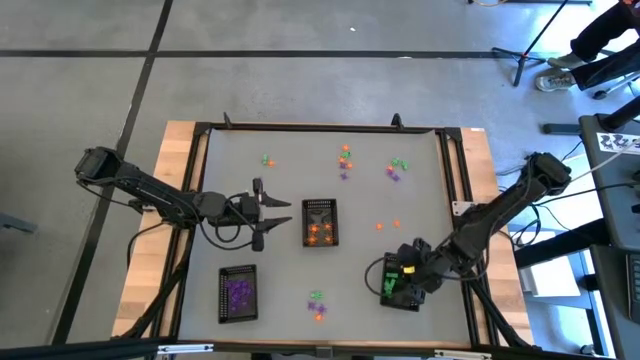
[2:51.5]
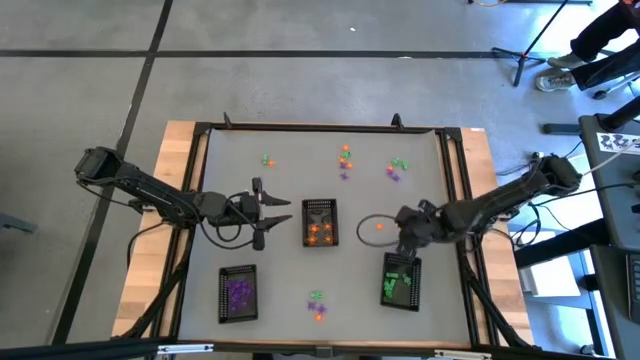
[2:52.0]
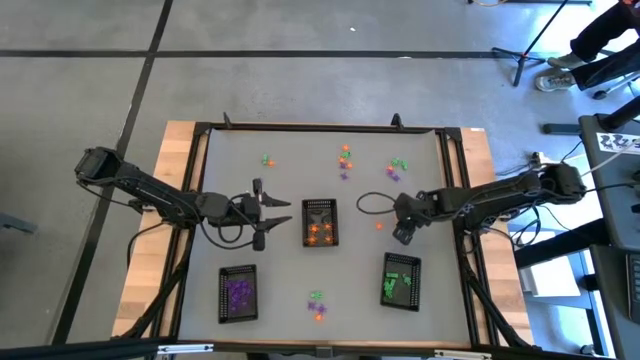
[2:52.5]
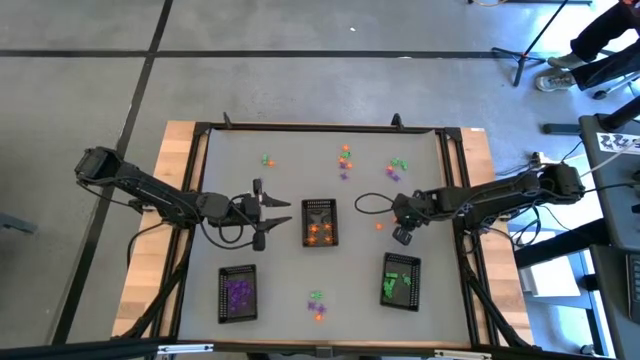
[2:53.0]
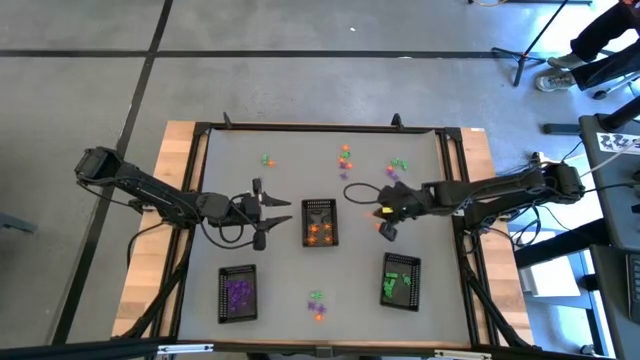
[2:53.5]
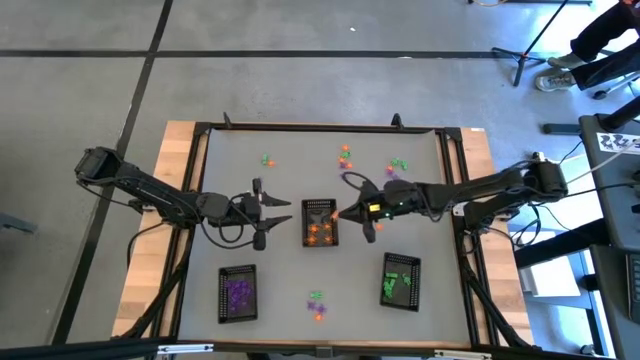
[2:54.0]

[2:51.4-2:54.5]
Task: Sort Halloween decoration
Put the orange spider toy into the top black bin

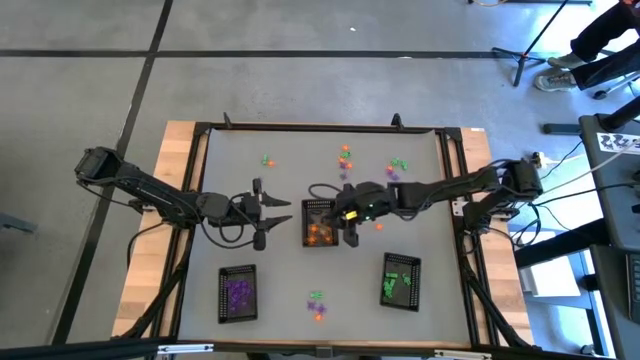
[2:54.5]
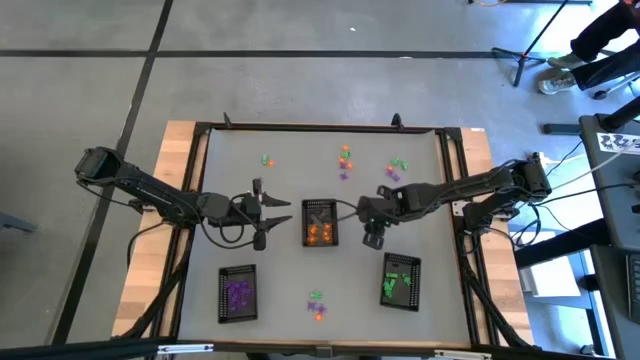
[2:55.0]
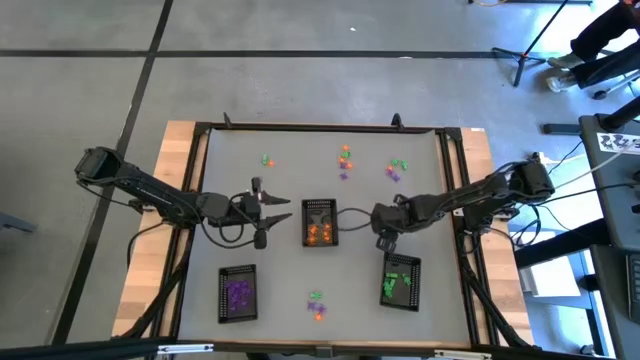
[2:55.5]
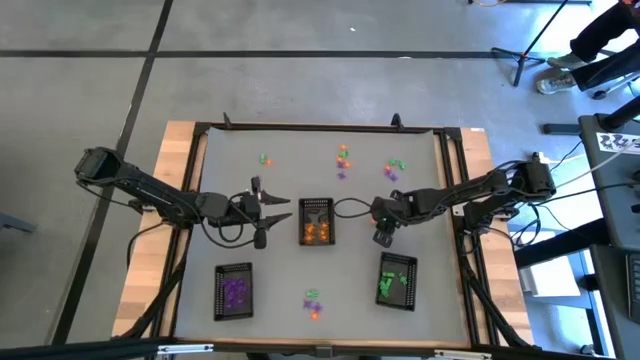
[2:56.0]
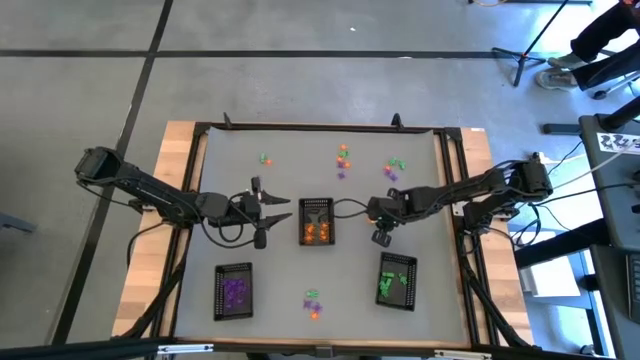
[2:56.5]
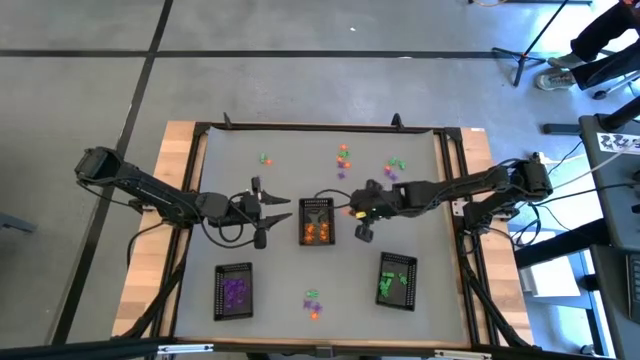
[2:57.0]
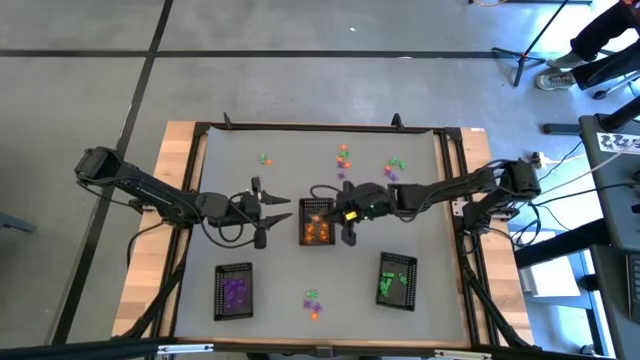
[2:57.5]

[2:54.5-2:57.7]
Put the orange spider toy into the top black bin

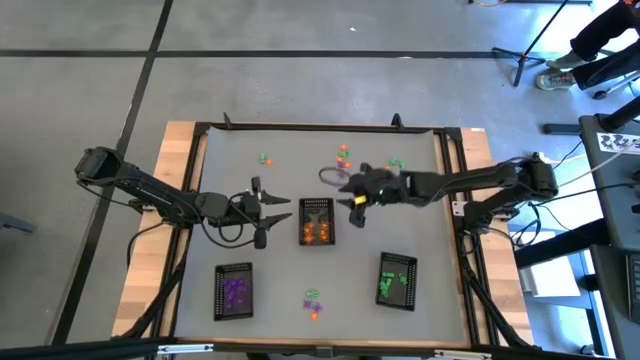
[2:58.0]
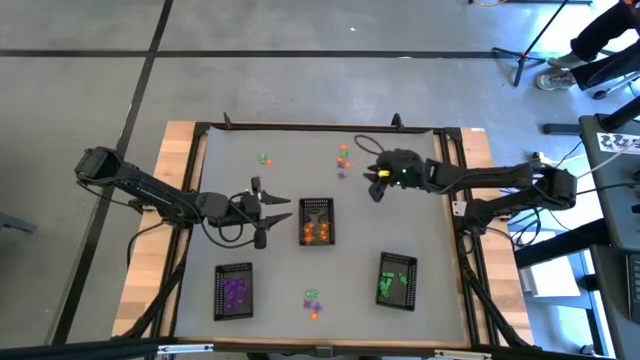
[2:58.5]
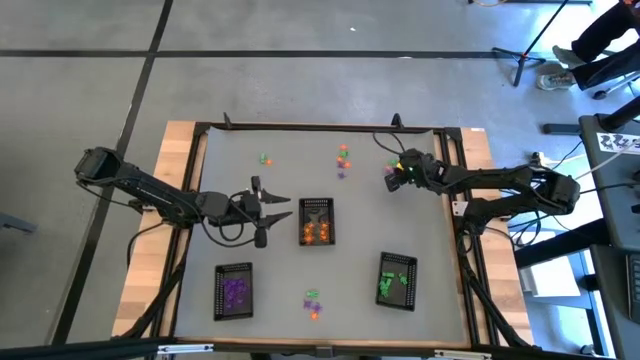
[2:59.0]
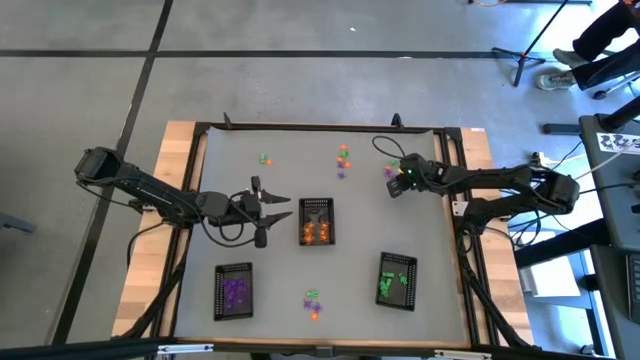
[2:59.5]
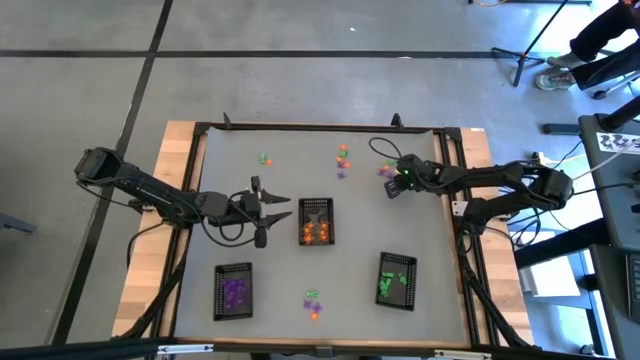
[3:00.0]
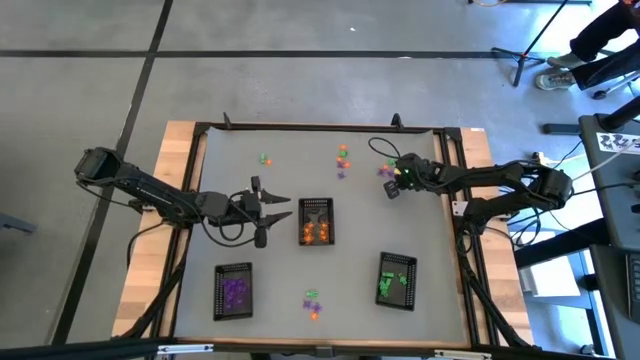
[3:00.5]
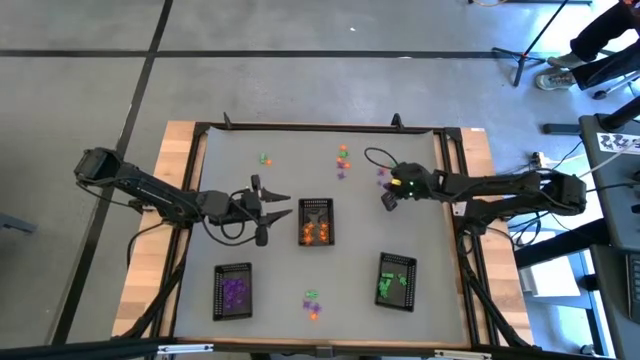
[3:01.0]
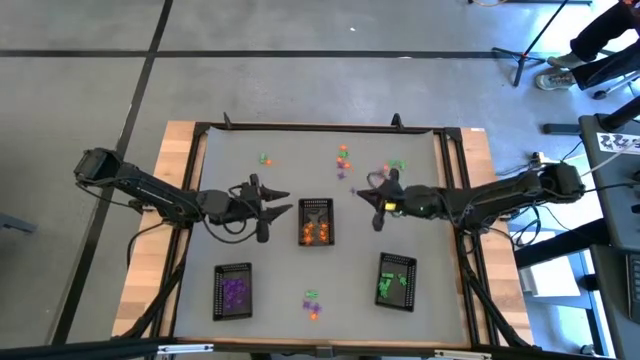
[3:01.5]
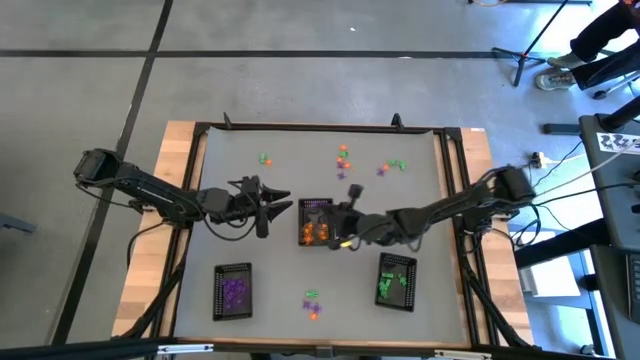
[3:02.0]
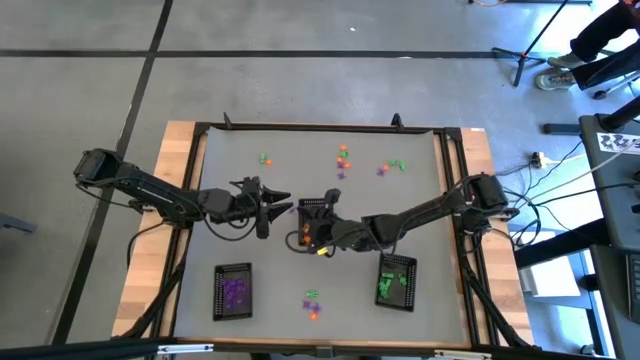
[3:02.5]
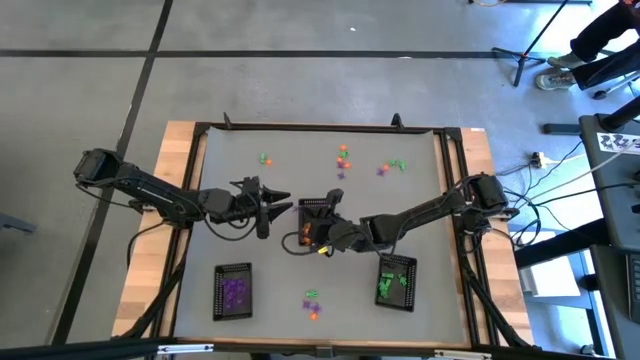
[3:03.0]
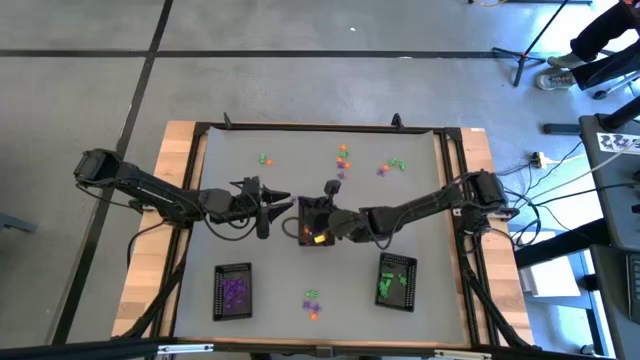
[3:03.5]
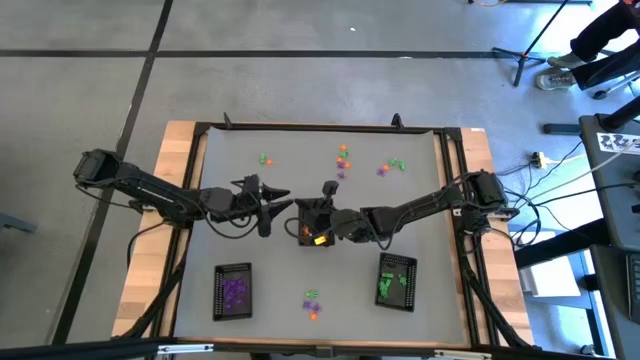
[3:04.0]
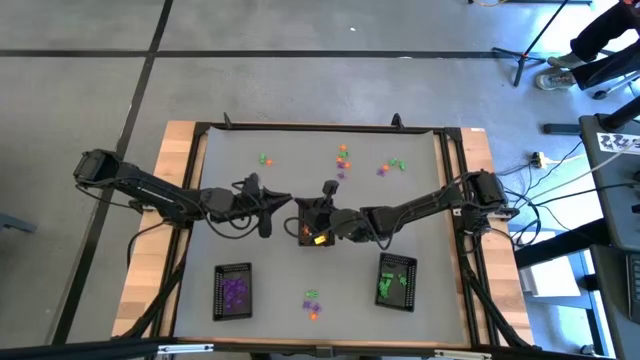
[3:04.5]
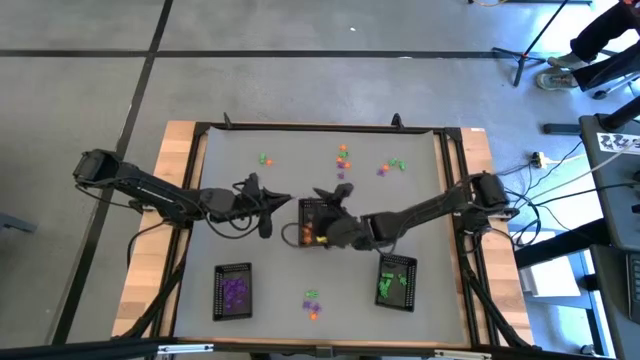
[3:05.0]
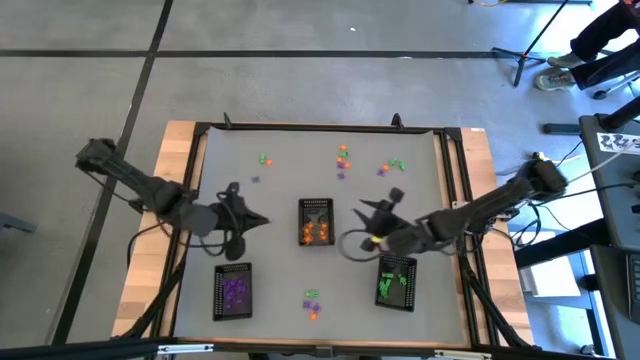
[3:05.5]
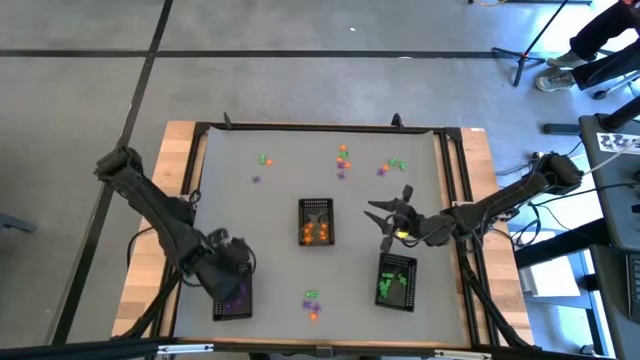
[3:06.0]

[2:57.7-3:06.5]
Put the violet spider toy into the bottom left black bin

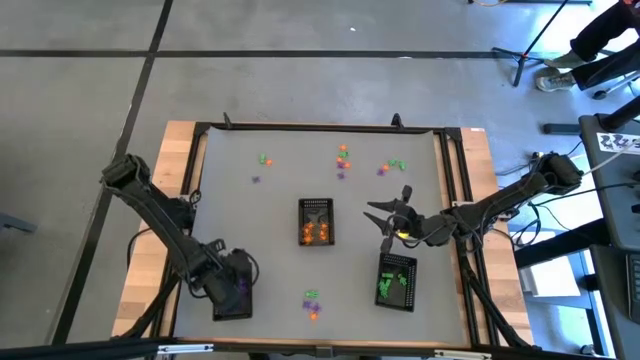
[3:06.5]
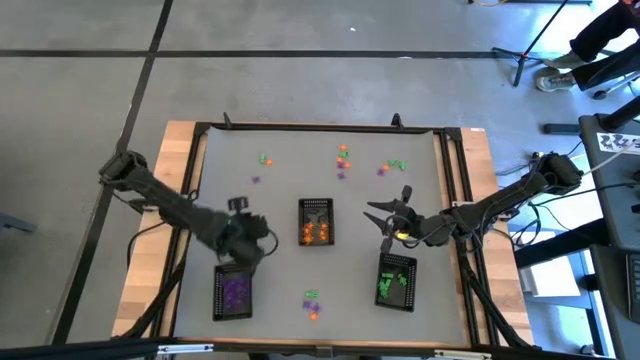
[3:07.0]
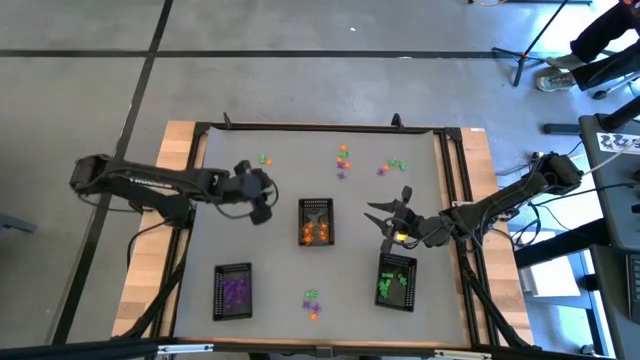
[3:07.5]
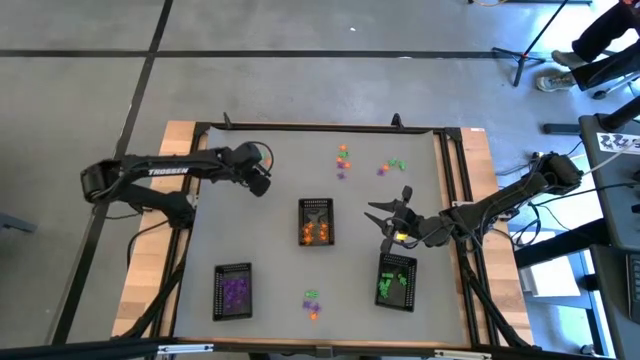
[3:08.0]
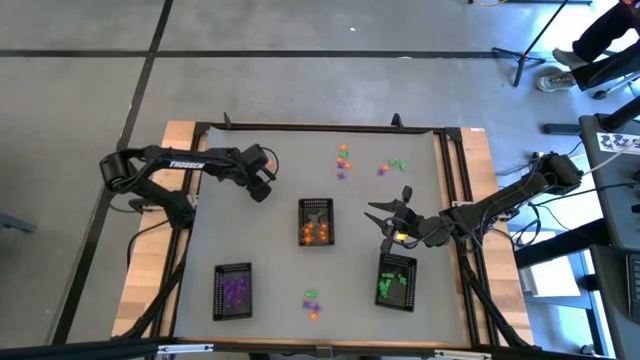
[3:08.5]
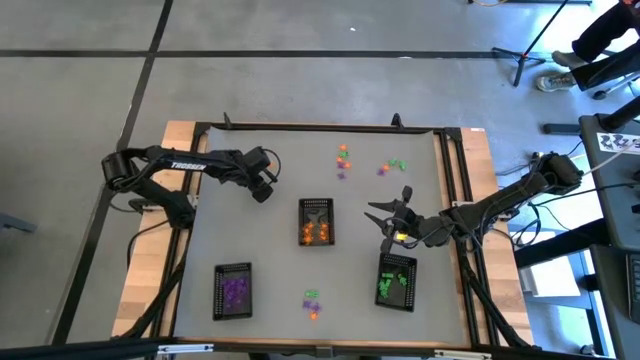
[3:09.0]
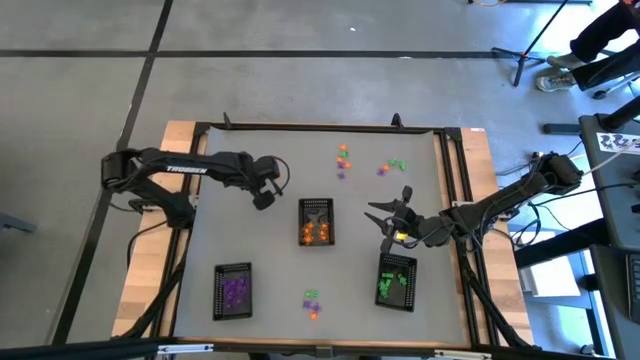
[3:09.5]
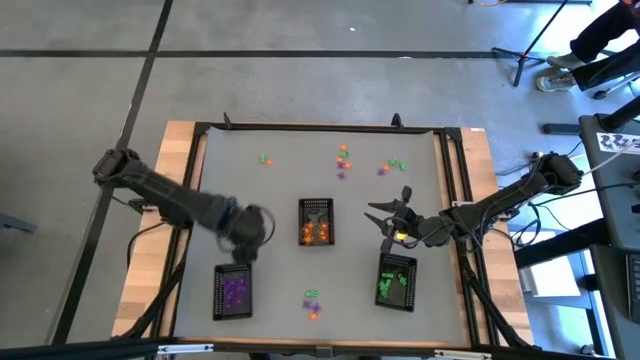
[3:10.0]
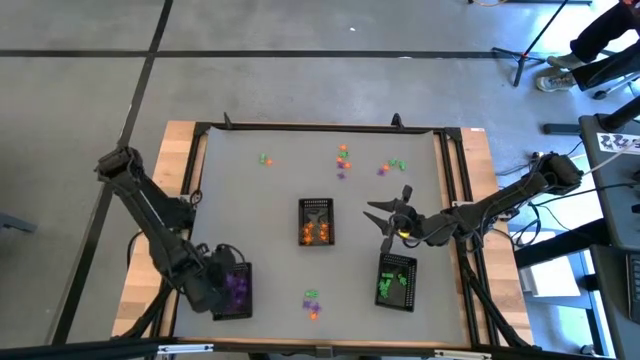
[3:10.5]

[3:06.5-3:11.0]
Put the violet spider toy into the bottom left black bin

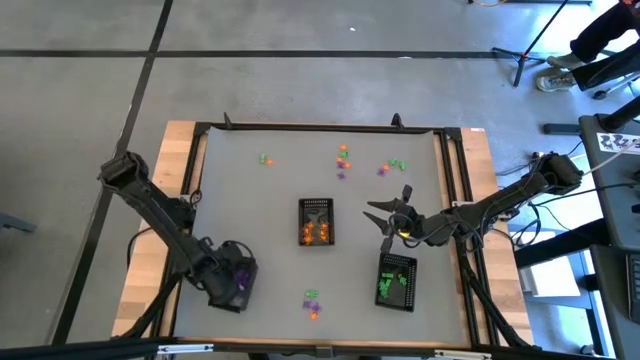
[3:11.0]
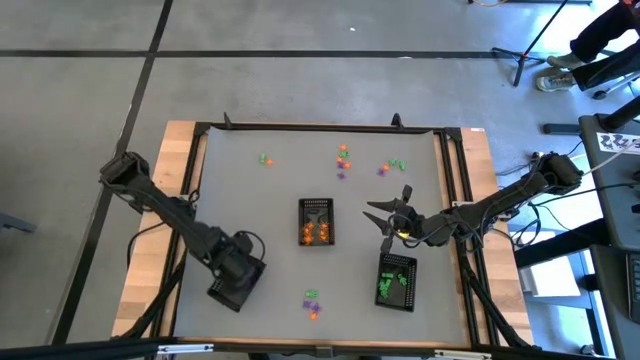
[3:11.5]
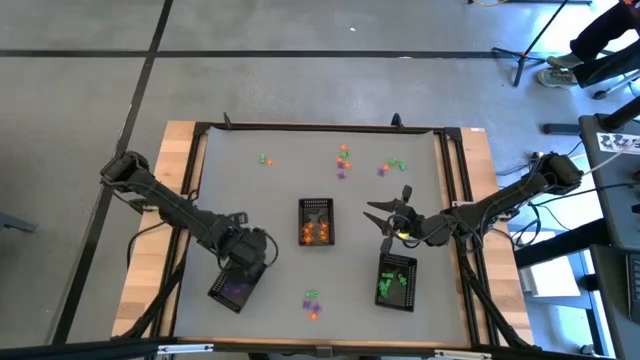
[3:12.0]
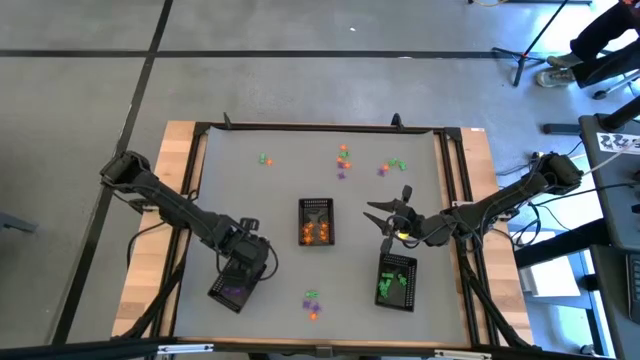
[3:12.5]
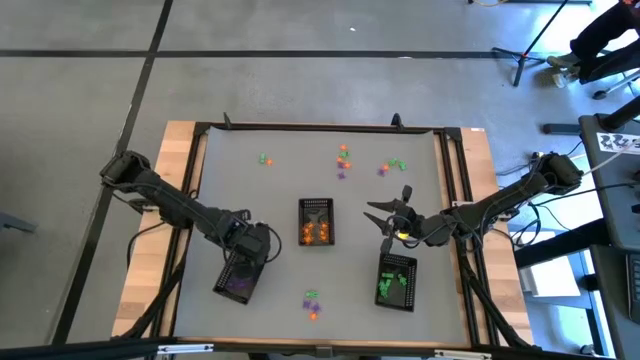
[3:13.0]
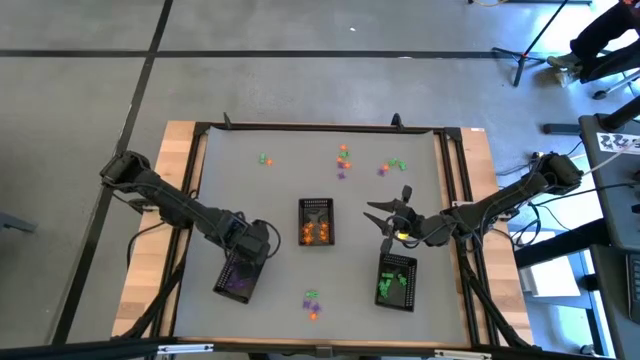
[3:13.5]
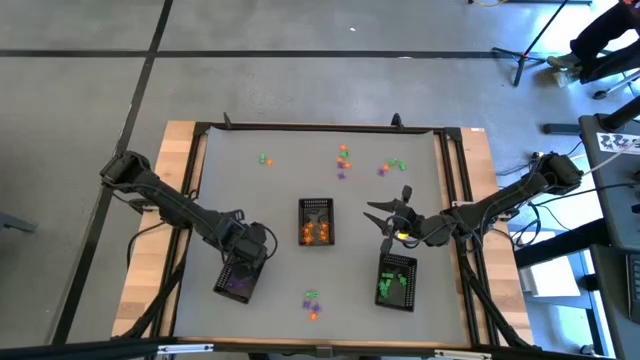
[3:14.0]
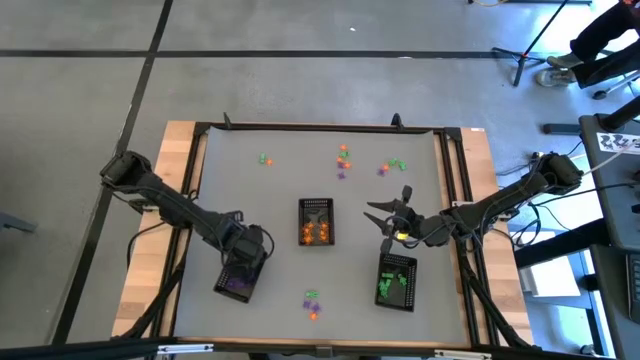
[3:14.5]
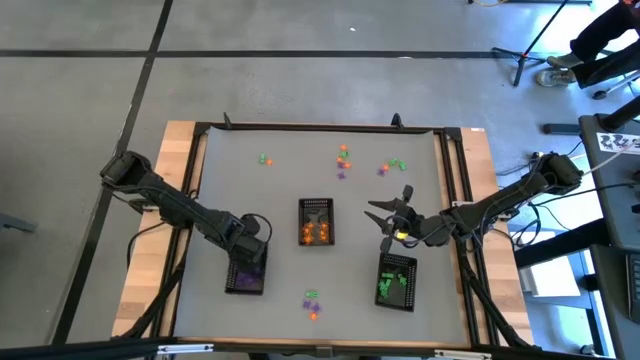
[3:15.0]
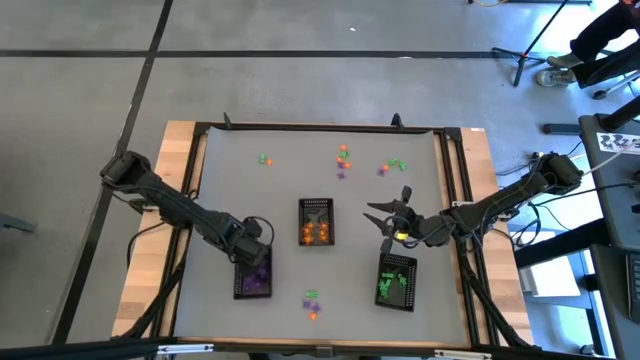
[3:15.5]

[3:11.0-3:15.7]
Adjust the bottom left black bin
